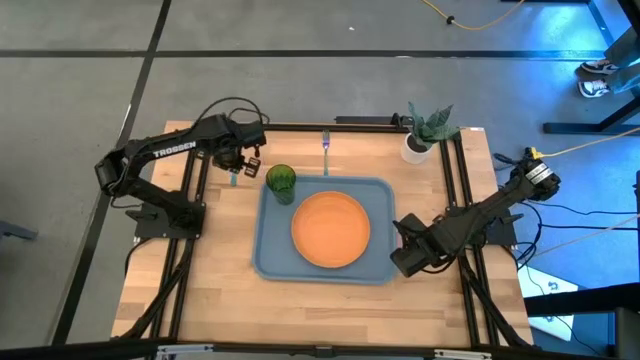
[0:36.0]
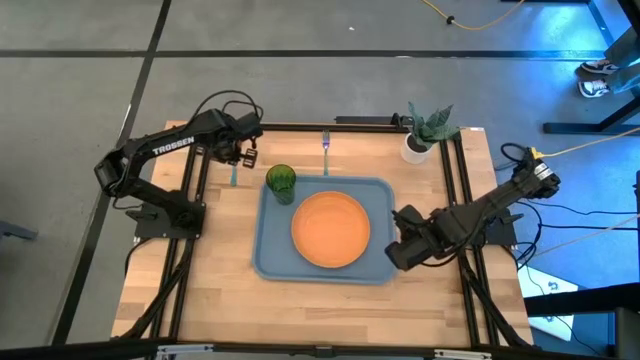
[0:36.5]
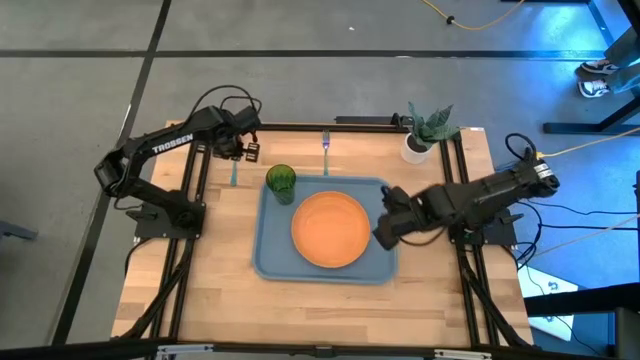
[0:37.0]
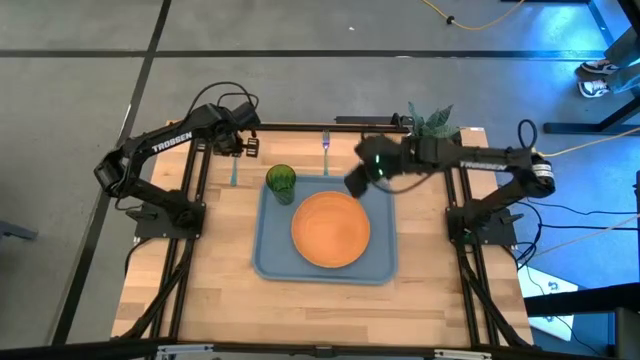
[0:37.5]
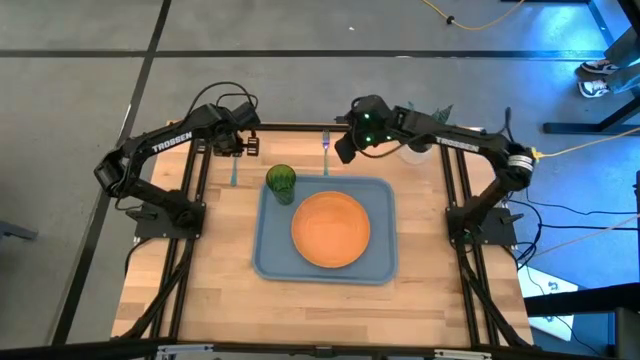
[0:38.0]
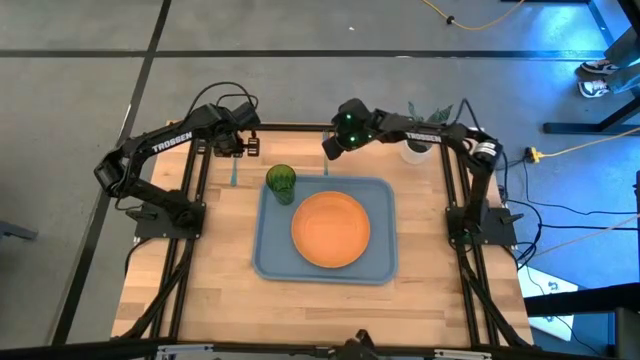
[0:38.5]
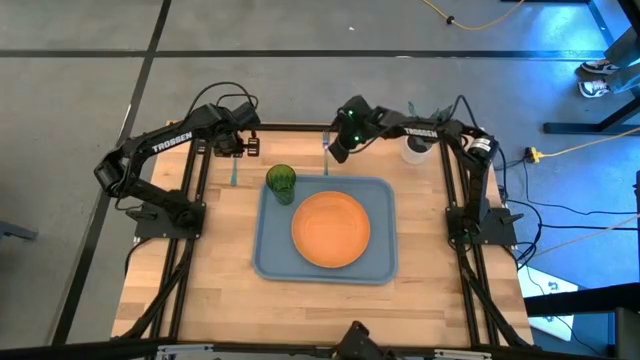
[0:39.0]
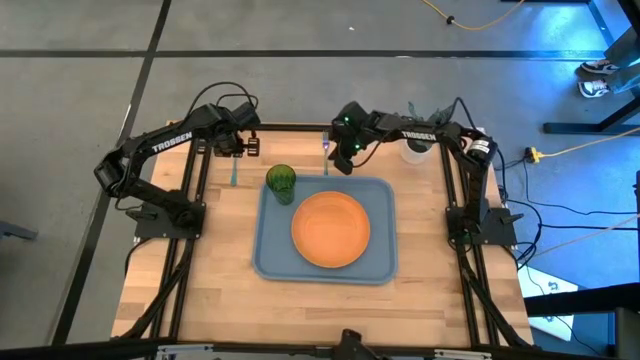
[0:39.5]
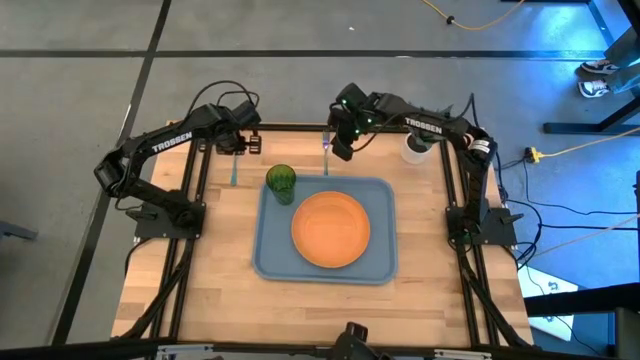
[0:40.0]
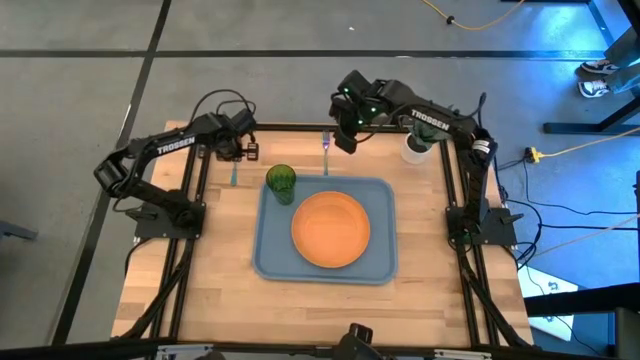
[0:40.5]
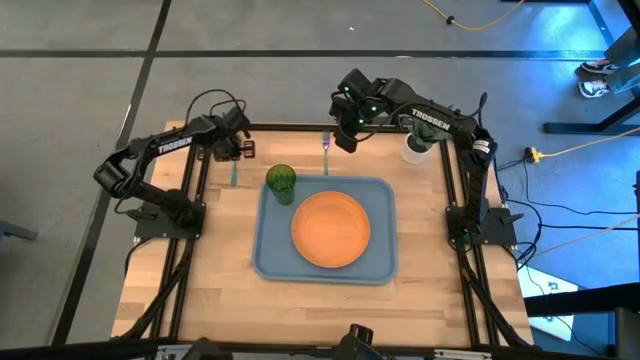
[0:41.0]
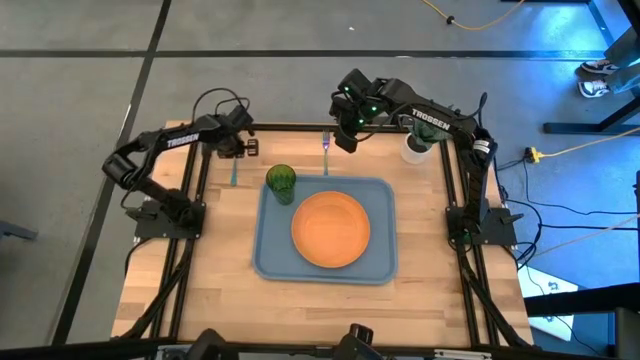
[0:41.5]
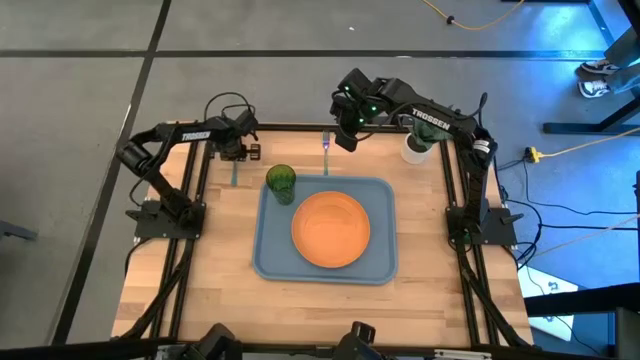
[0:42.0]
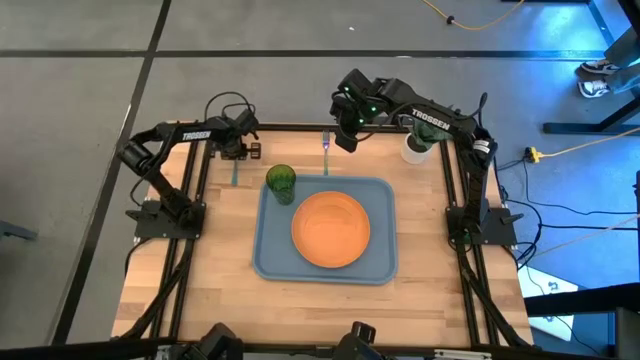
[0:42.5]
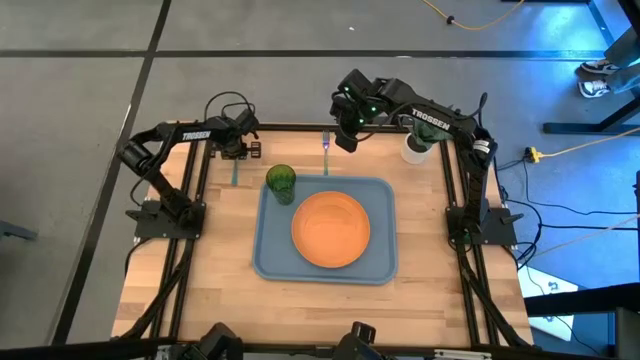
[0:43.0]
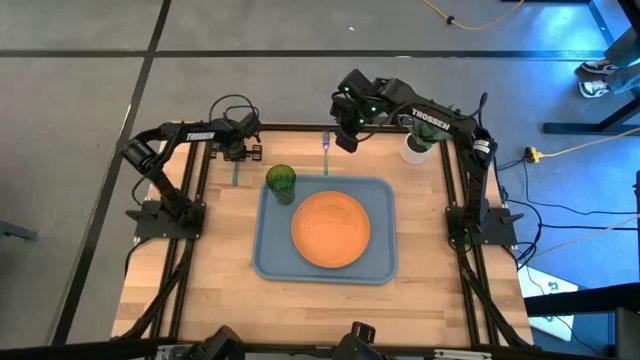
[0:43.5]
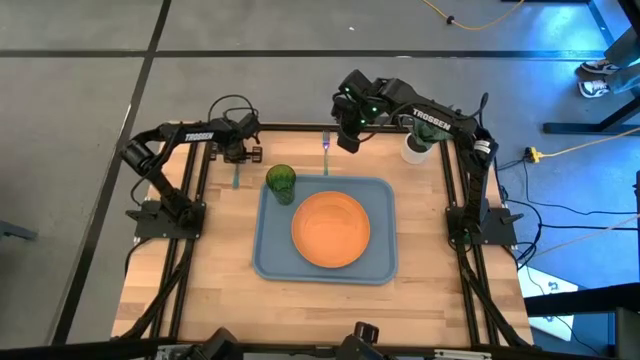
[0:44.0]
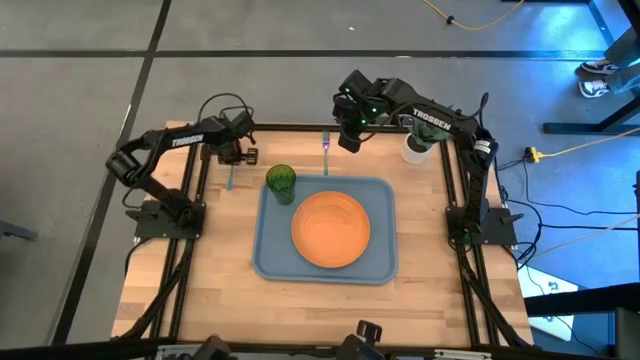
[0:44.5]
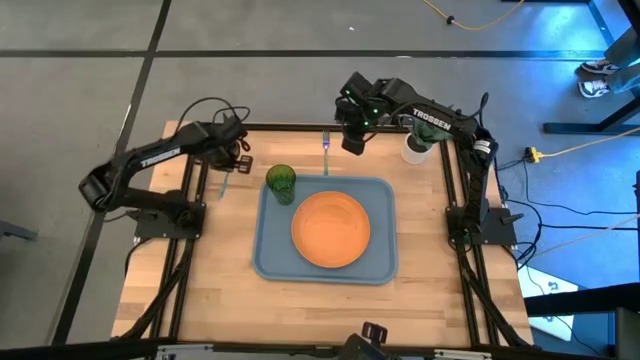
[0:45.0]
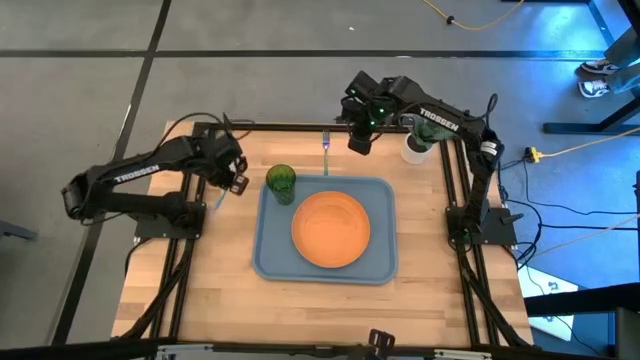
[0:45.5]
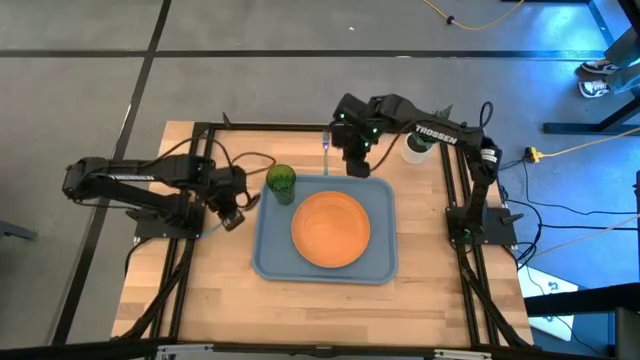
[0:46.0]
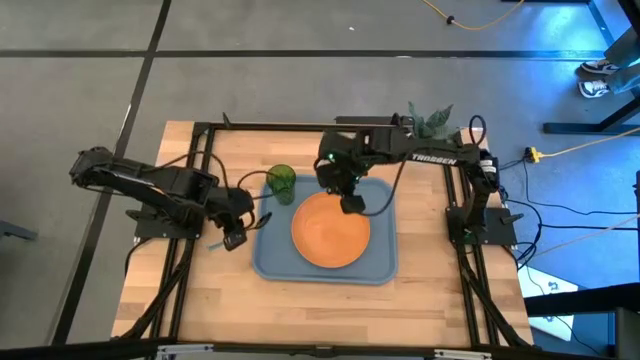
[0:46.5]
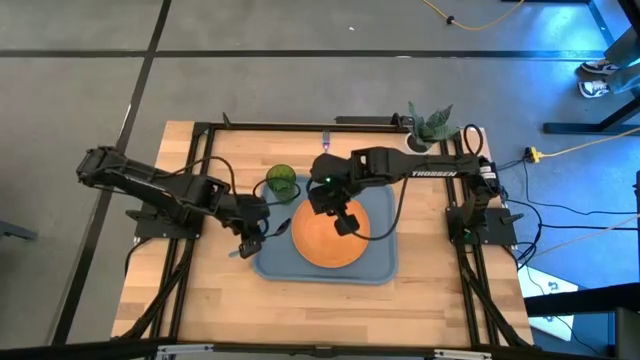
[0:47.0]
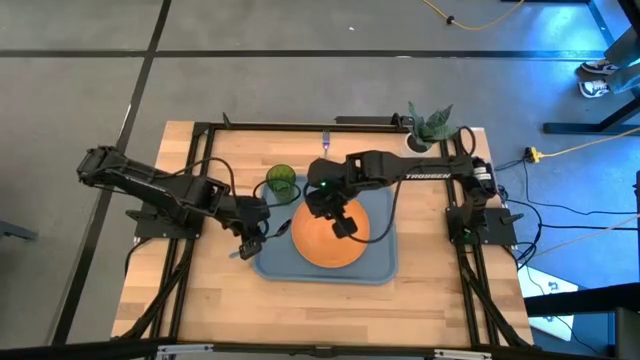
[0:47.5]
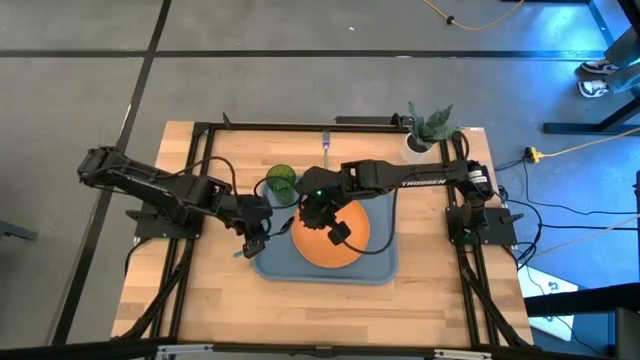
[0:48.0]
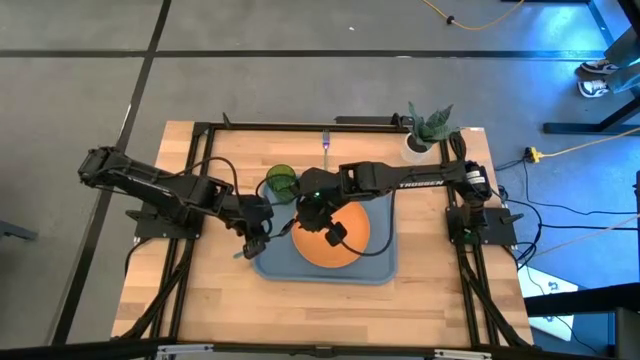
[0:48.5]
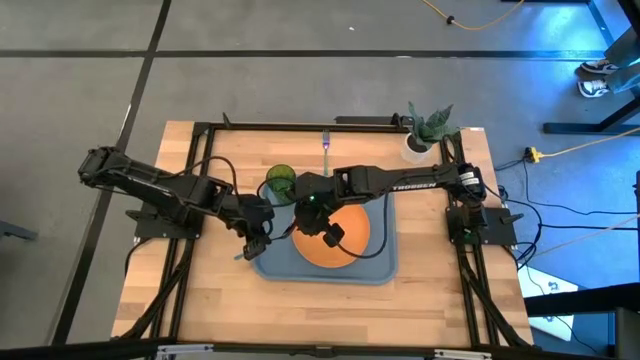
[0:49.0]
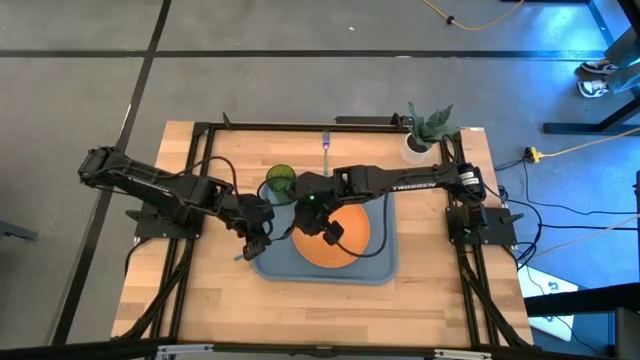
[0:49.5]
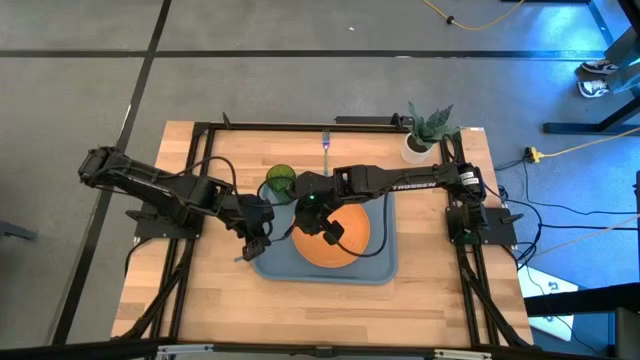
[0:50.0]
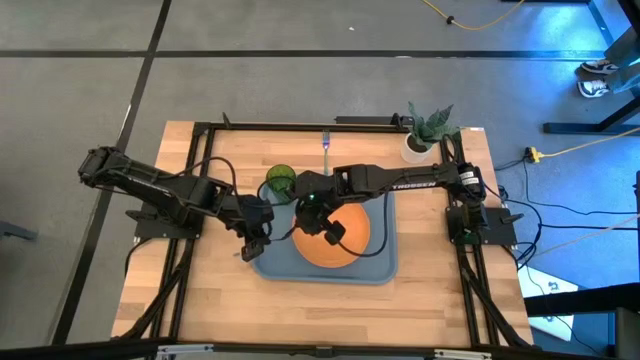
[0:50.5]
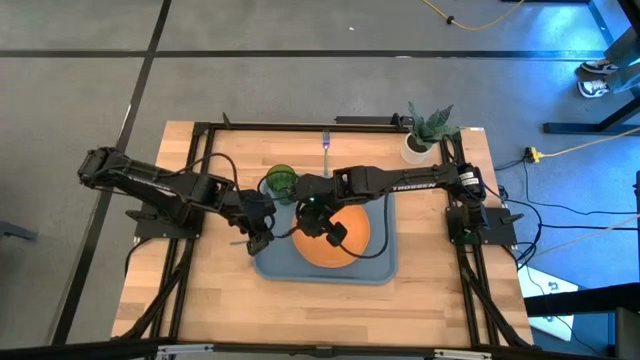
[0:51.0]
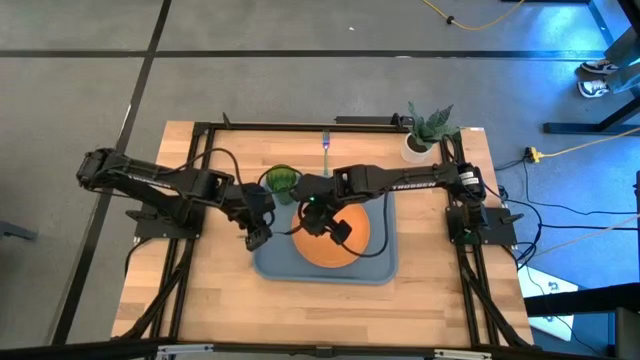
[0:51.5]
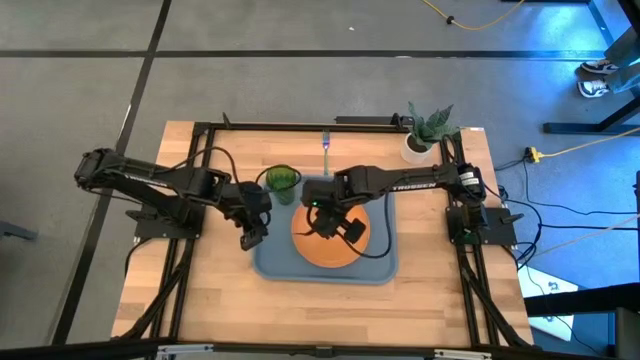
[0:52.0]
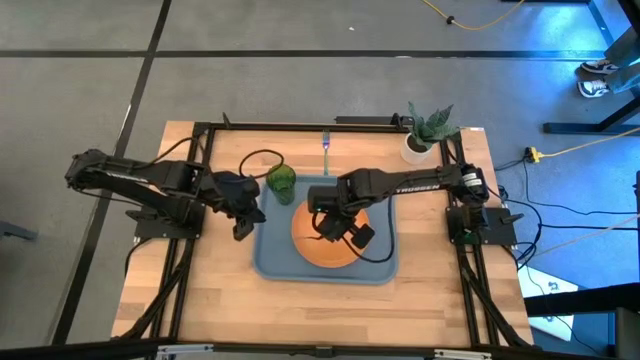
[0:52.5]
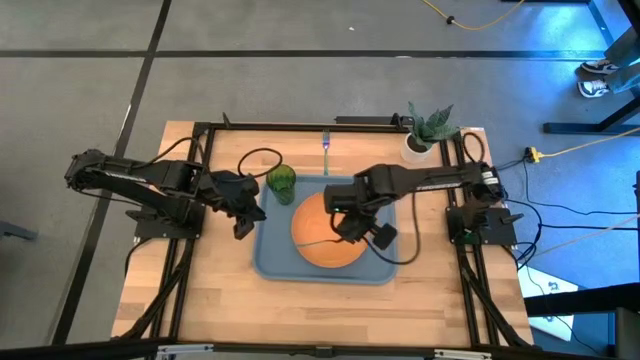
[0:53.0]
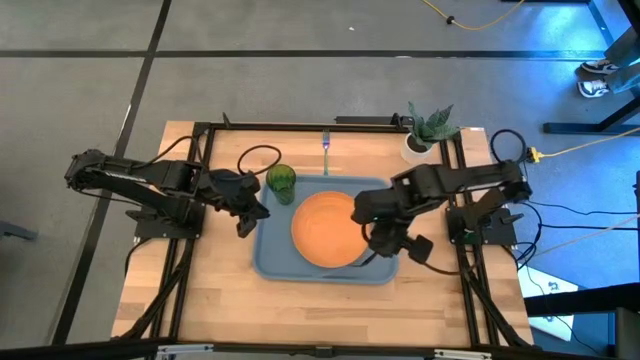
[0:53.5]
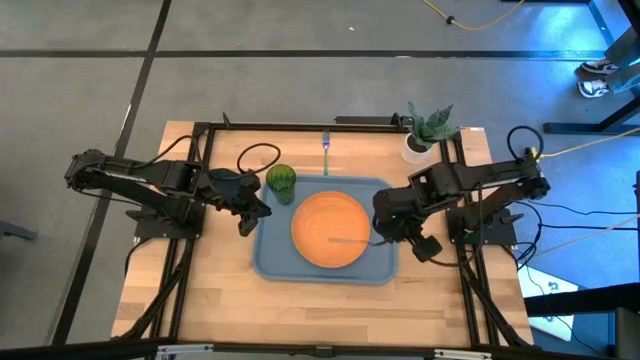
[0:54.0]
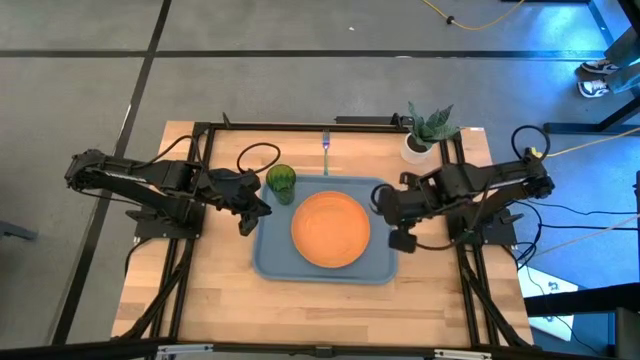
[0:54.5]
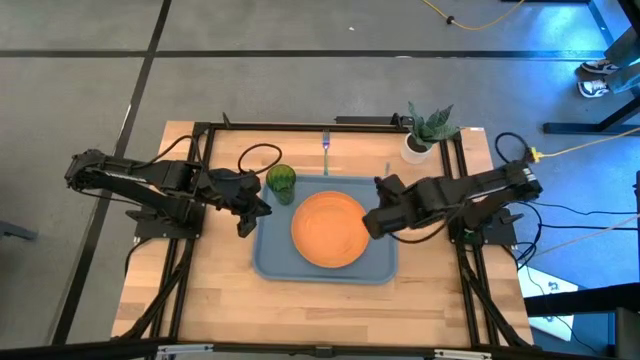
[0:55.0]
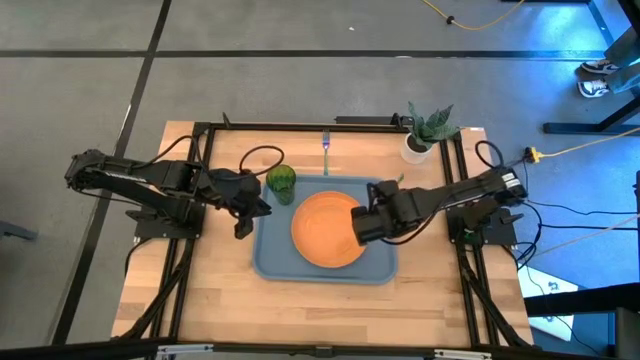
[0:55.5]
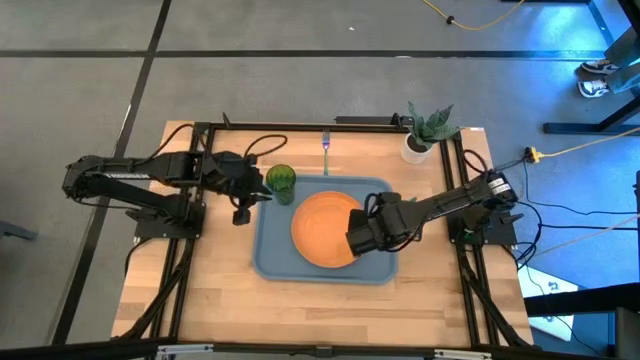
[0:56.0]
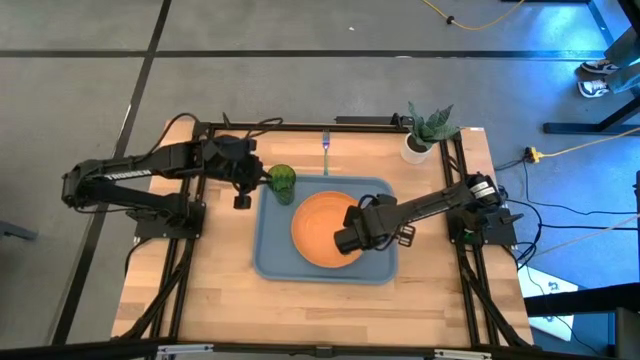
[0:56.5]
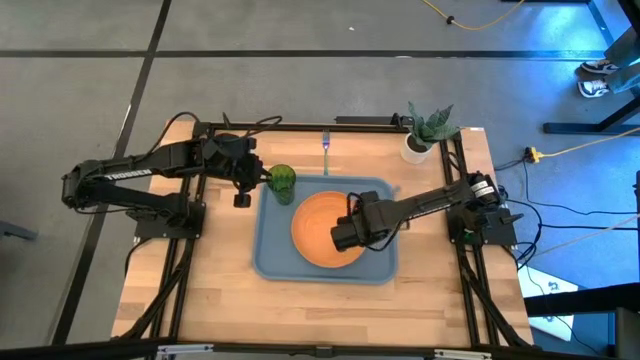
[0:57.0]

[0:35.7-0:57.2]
Task: Pick and place plate/cup/fork/spoon on tray
Put the blue spoon on the blue tray to the right of the orange plate
